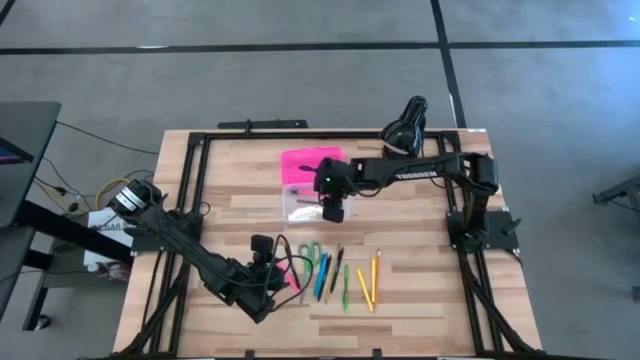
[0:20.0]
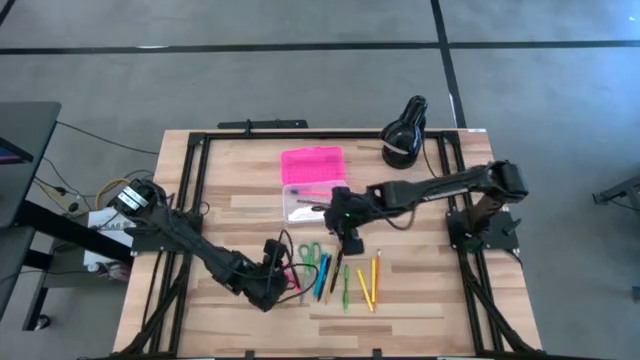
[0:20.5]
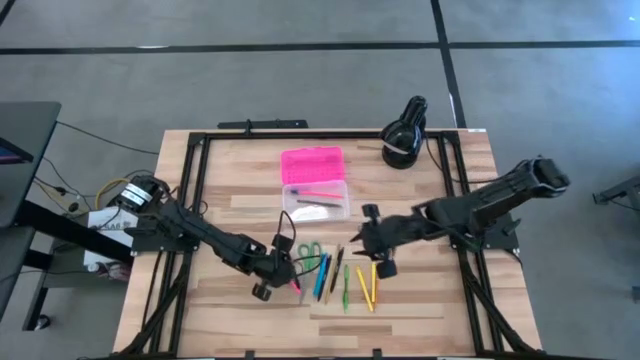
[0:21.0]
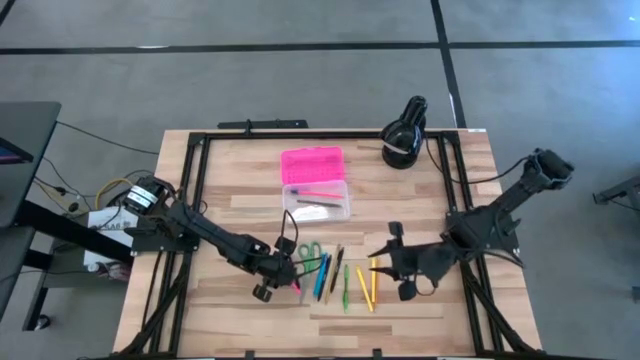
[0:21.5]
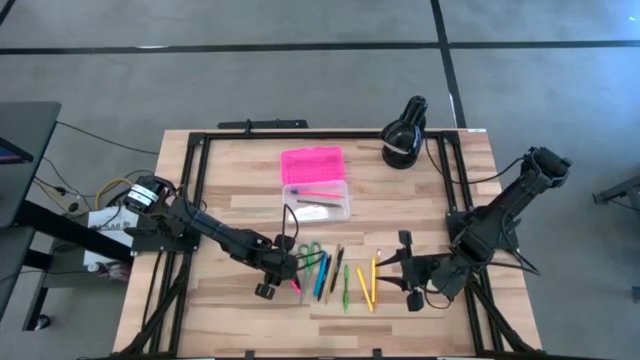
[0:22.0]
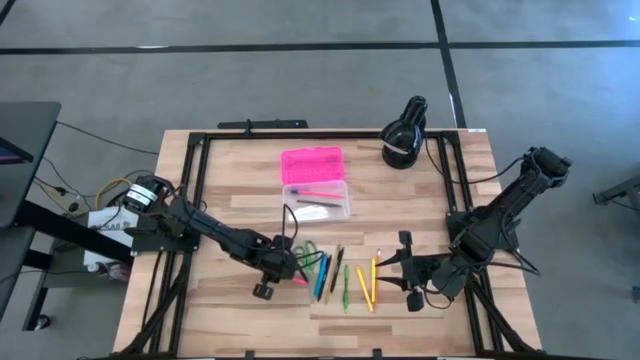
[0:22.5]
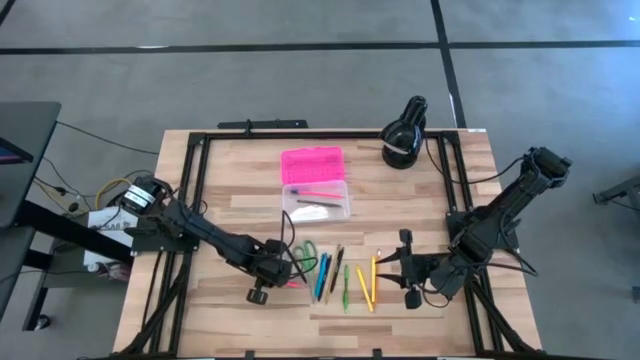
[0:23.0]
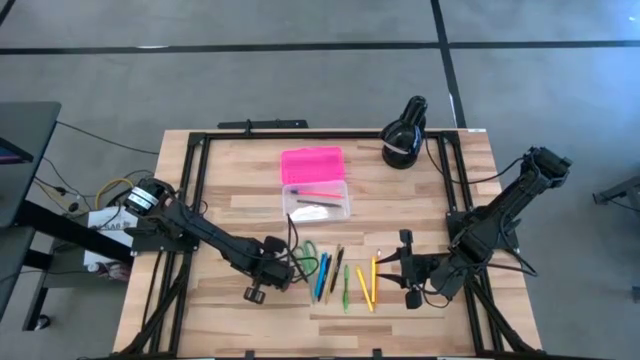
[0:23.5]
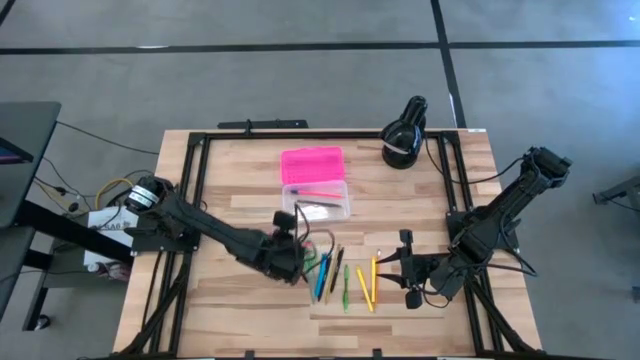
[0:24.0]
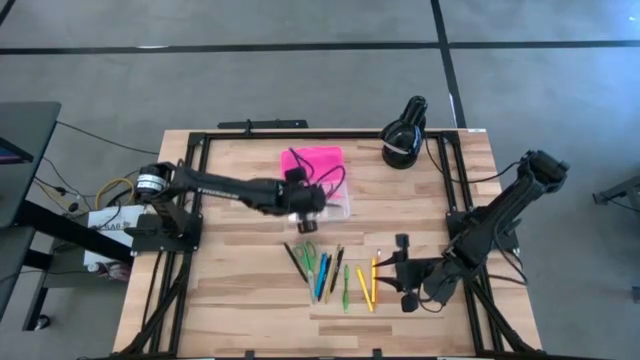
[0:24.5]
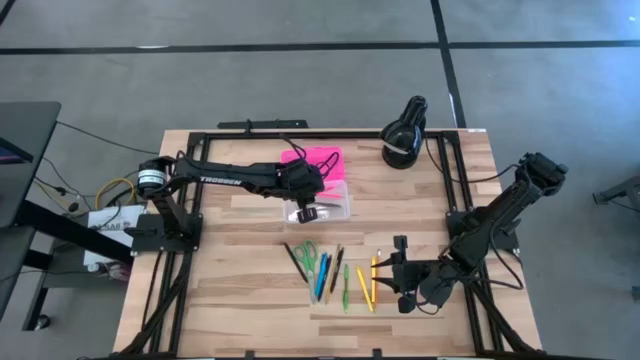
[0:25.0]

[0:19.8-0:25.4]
Task: Pick & place school supplies into a supply box
Put the pink pen into the supply box

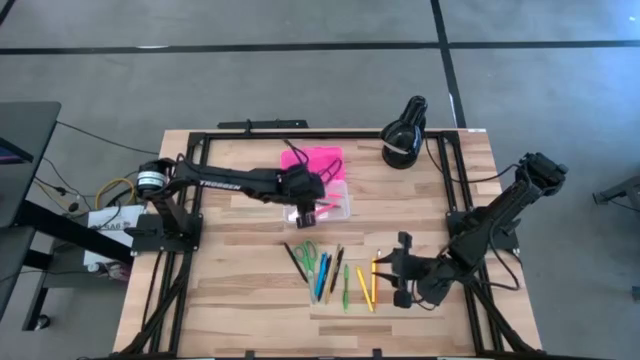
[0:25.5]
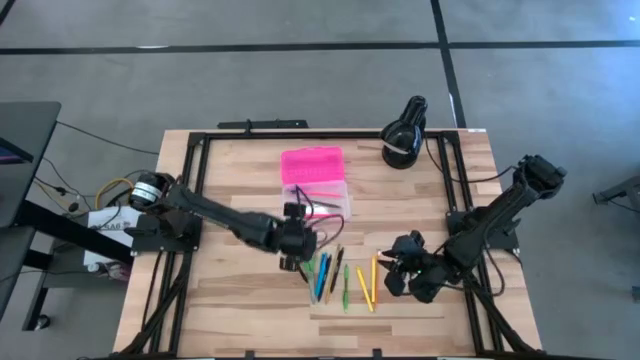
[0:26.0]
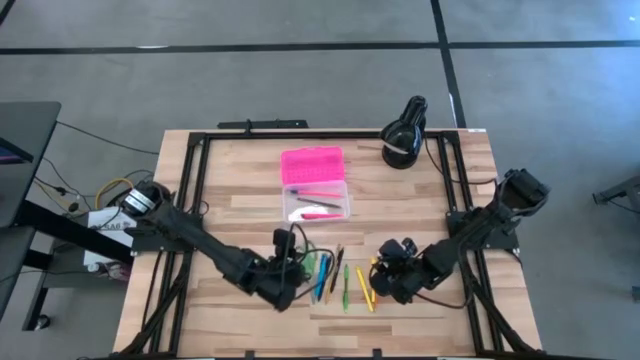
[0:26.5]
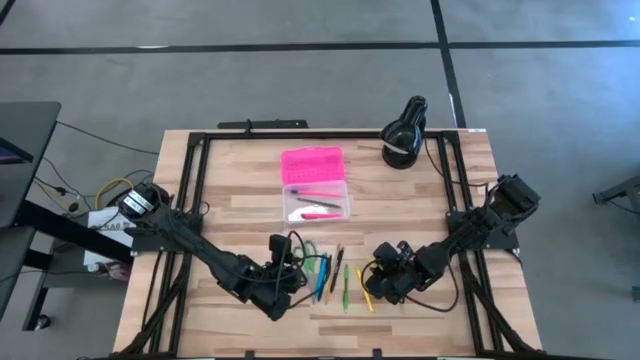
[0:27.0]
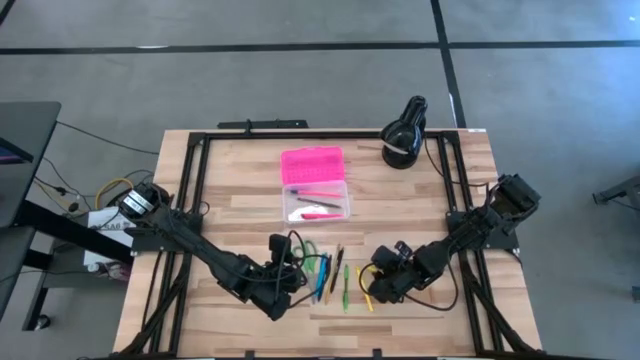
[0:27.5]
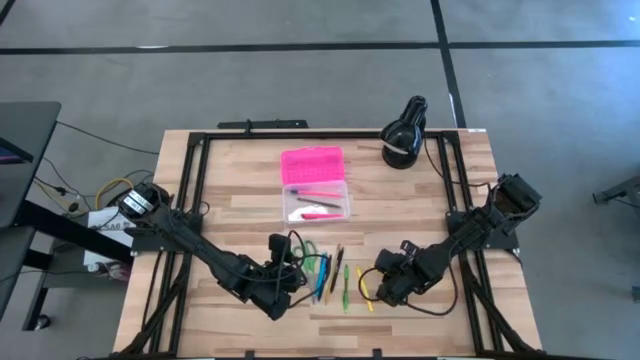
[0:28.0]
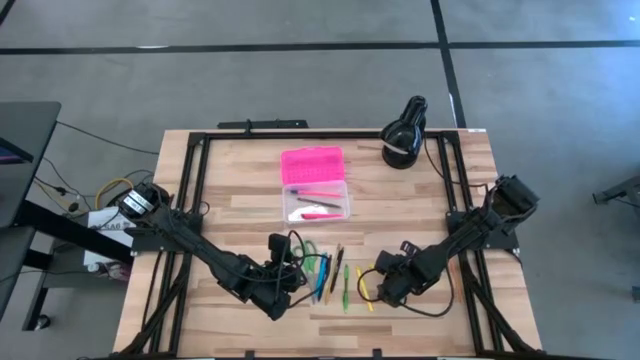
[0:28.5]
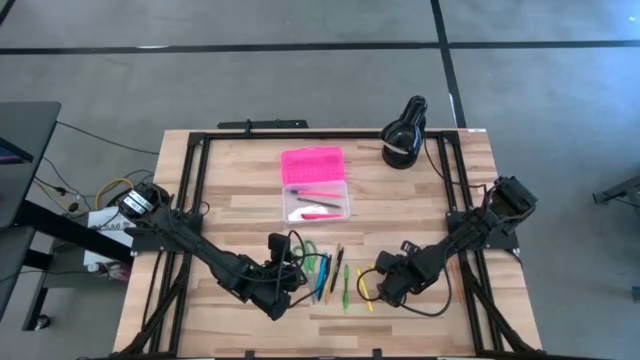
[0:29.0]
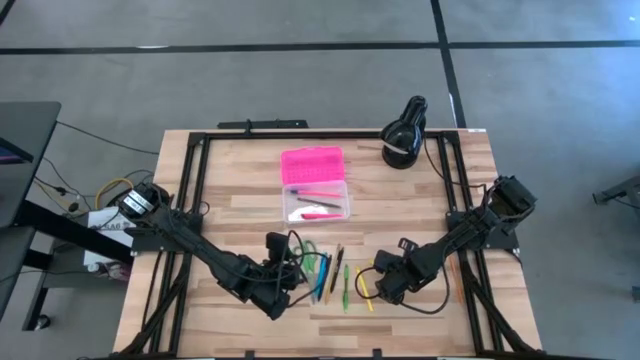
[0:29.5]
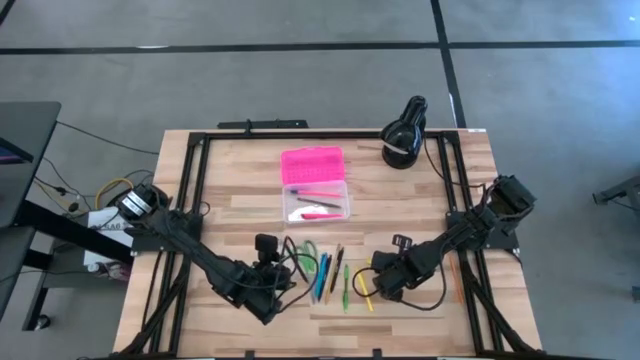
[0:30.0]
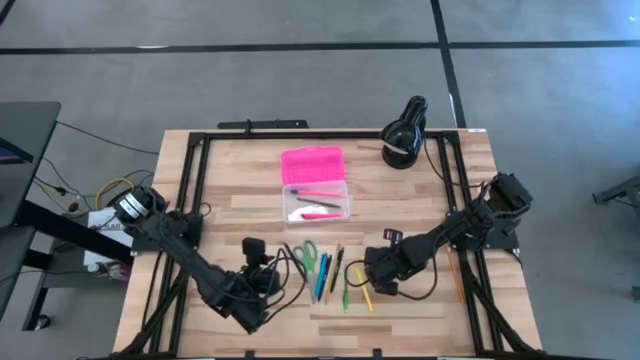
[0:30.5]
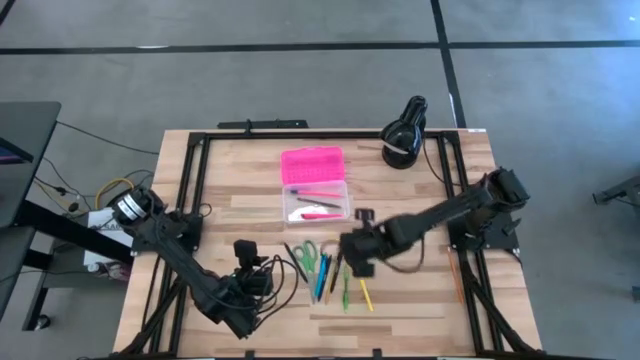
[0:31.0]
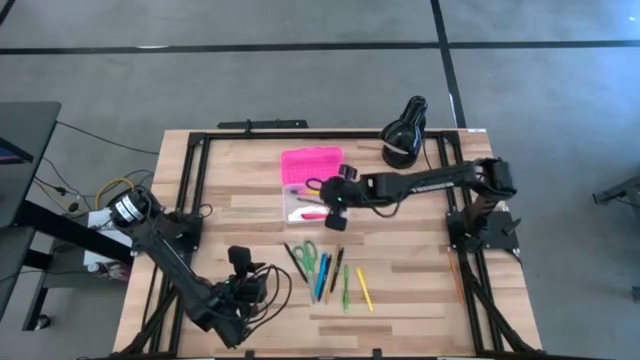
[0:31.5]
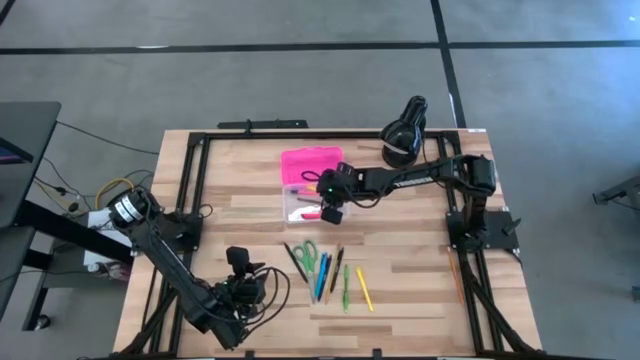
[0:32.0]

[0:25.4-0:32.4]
Put the right yellow pen into the supply box

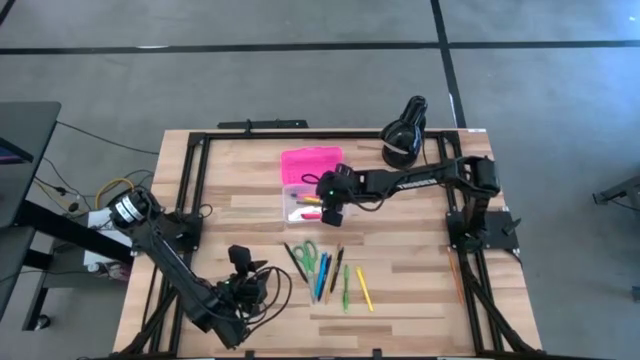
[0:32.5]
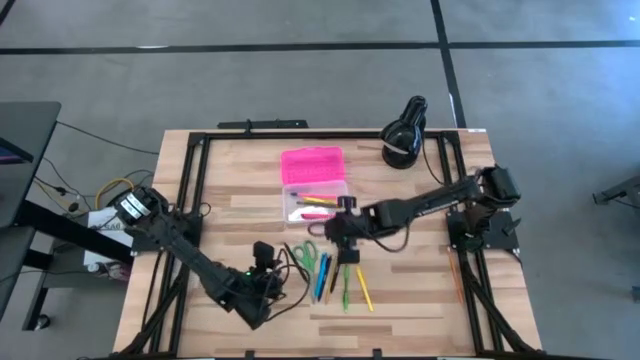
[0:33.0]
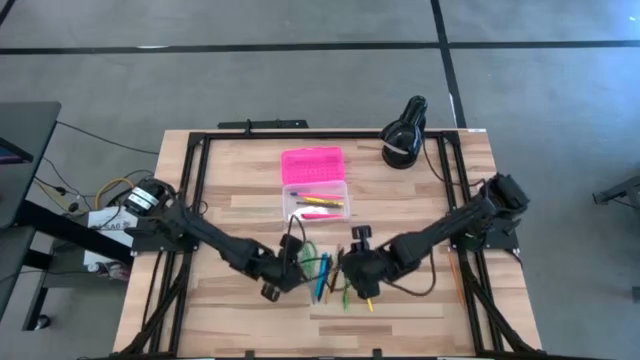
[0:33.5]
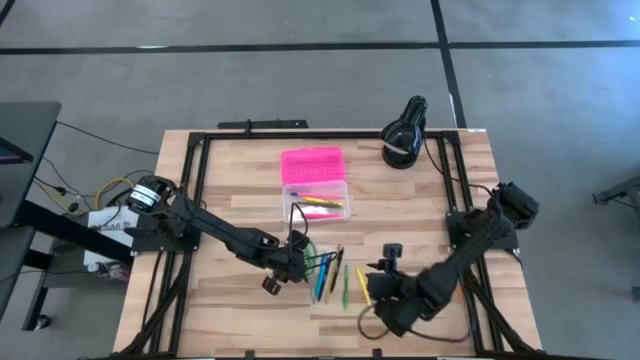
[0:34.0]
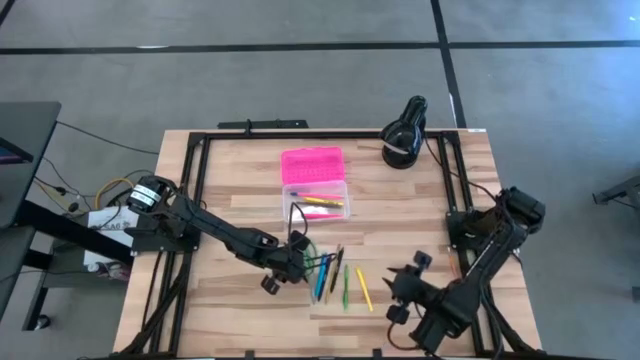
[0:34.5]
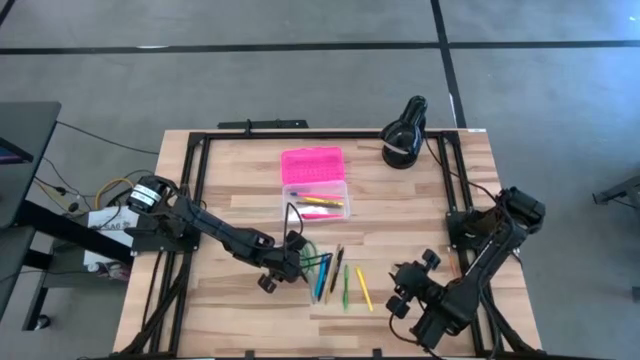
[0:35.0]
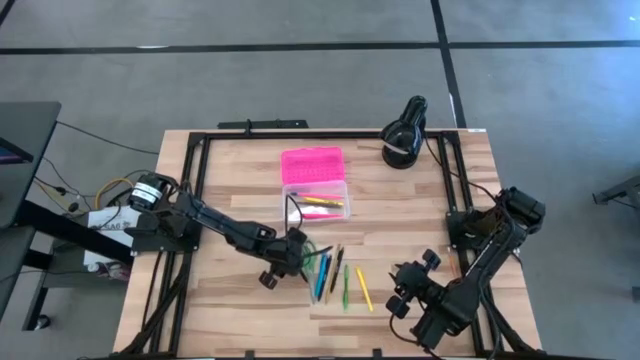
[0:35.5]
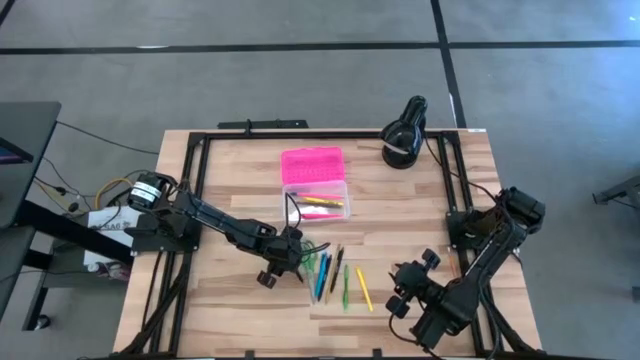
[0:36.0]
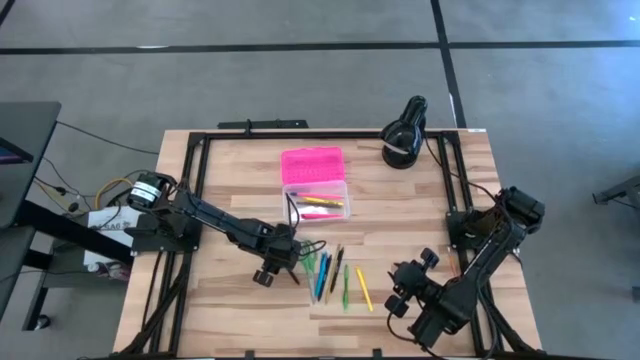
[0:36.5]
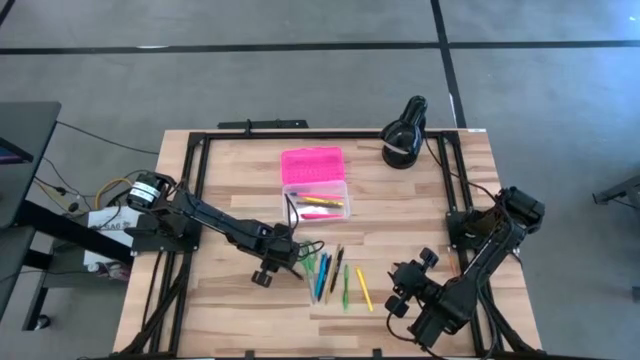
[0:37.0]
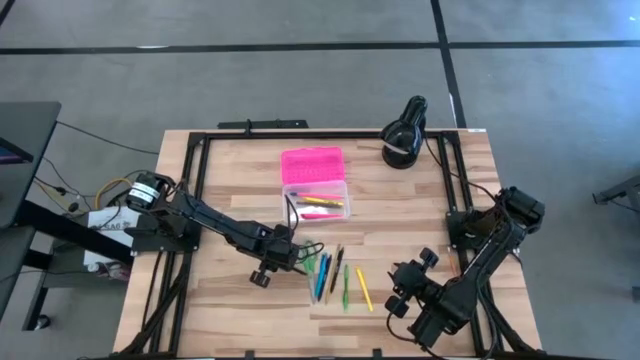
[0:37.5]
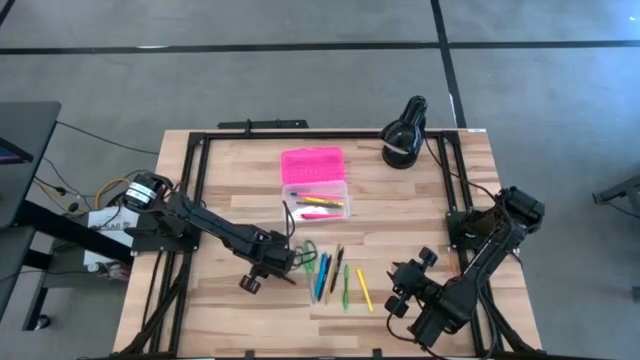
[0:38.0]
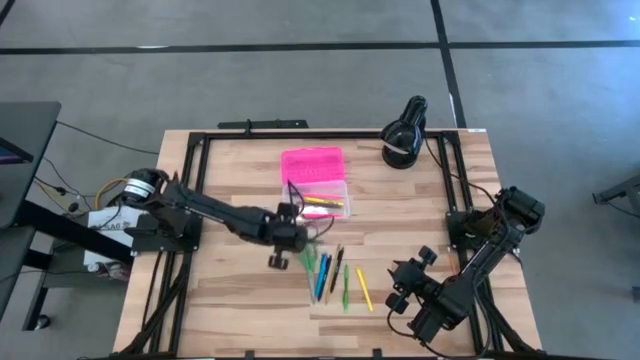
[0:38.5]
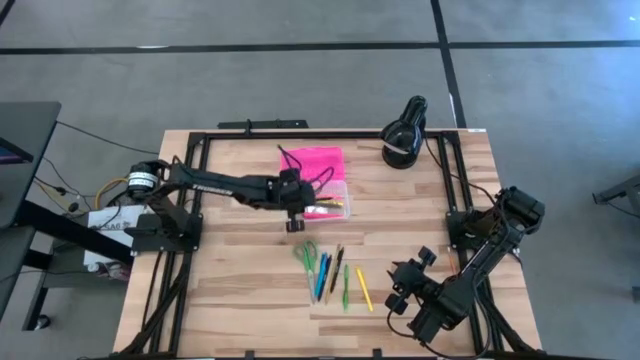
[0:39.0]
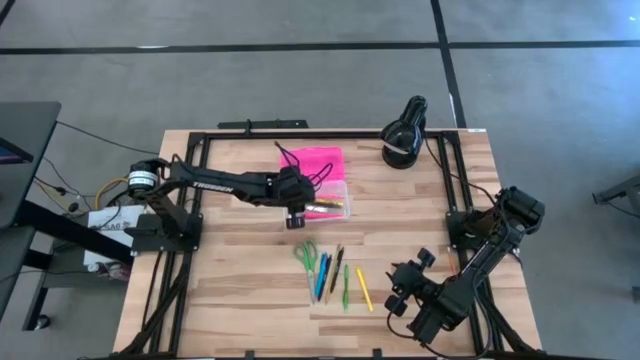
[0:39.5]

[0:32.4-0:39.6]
Put the left black pen into the supply box

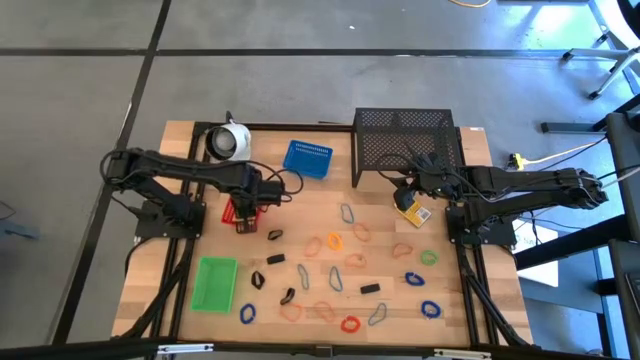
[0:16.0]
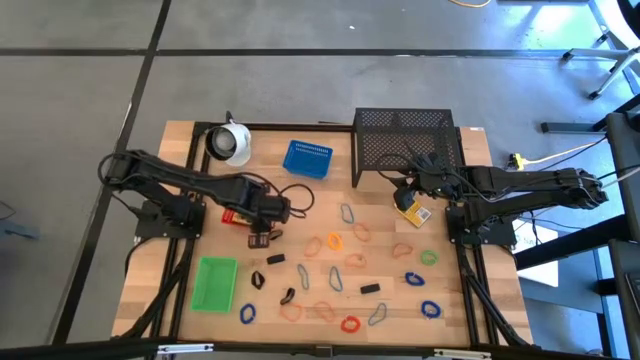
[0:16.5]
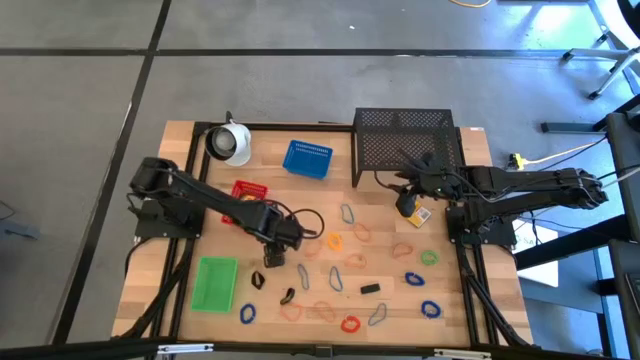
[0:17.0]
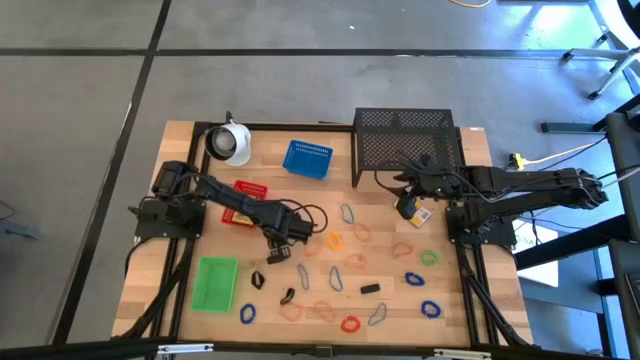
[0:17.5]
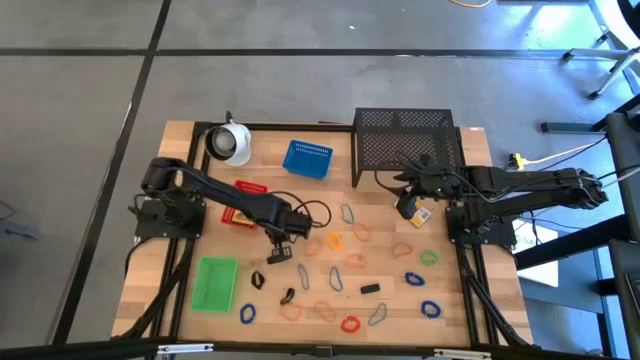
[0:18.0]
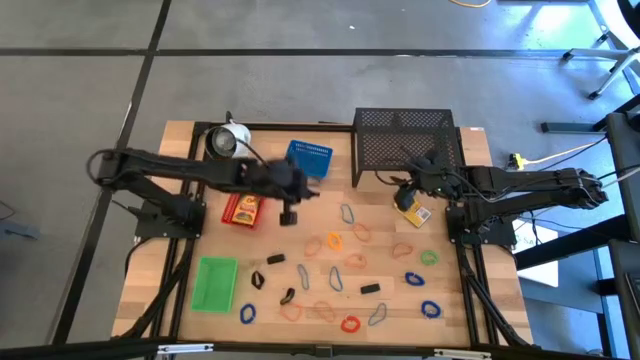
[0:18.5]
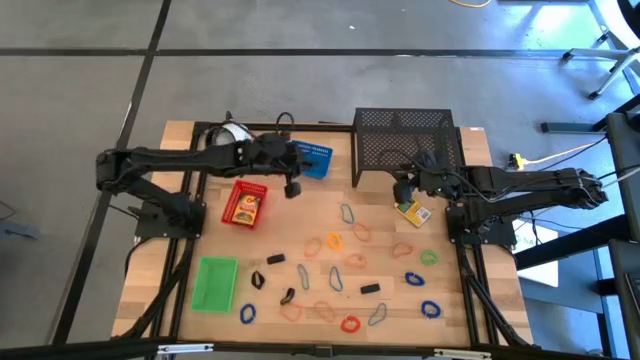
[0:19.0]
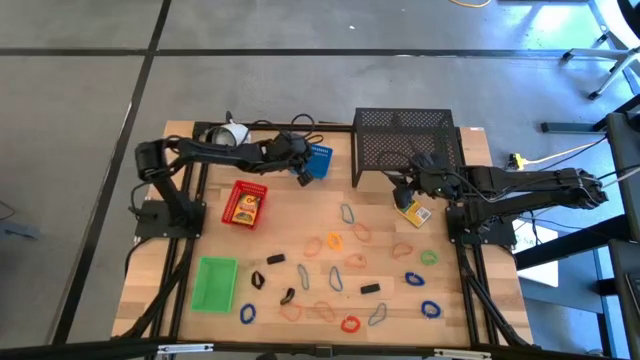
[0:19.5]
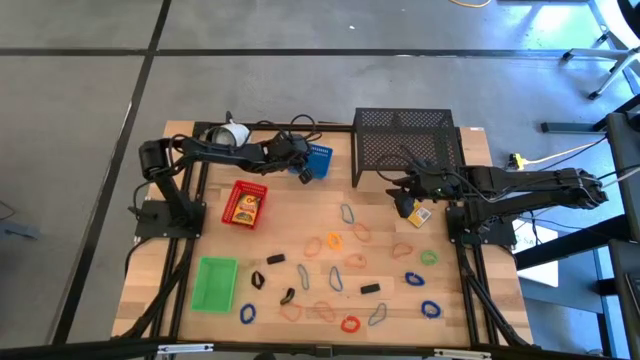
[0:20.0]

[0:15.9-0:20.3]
Task: Pick & Place Office Desk Supplies
Put the black rubber band into the blue bin
